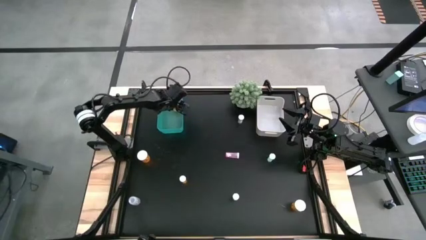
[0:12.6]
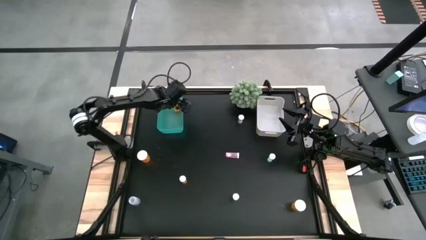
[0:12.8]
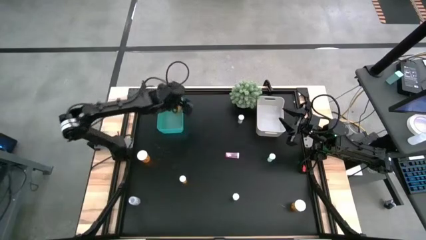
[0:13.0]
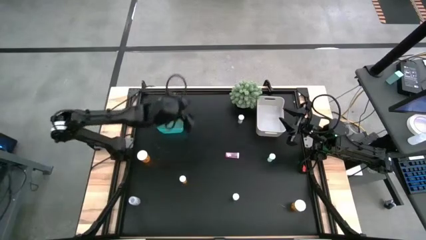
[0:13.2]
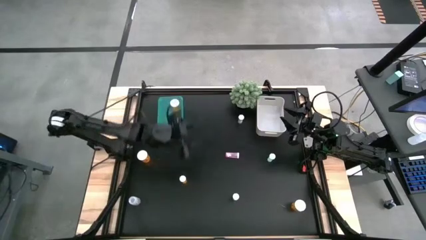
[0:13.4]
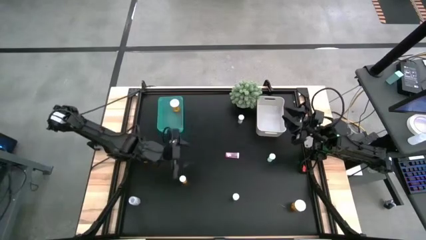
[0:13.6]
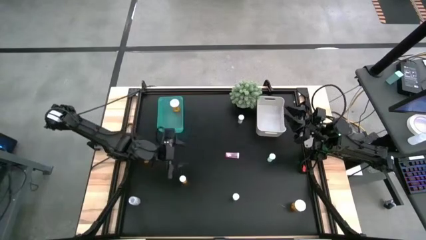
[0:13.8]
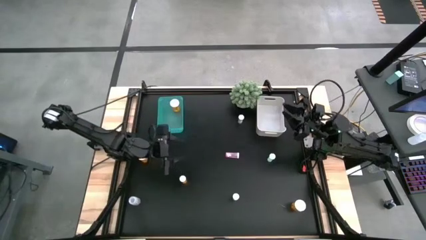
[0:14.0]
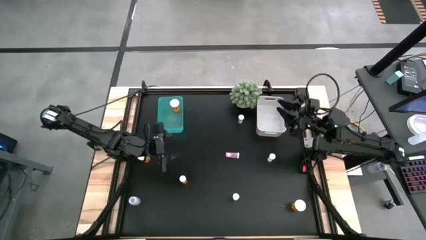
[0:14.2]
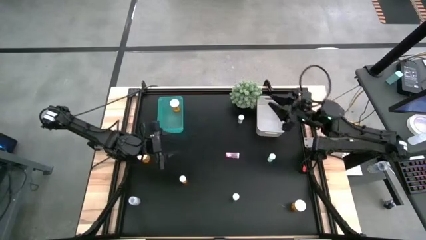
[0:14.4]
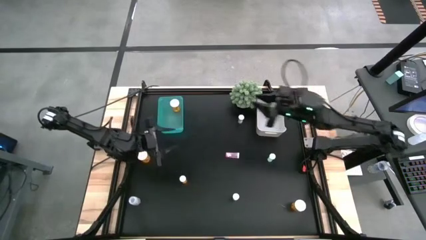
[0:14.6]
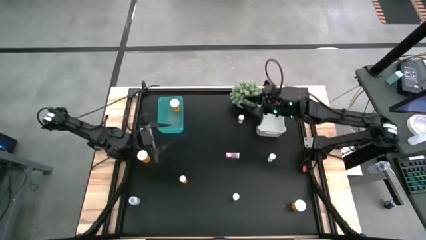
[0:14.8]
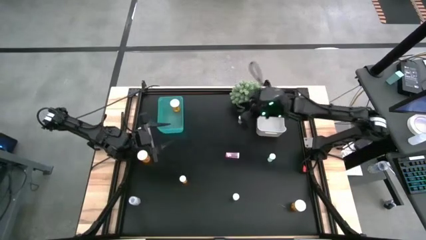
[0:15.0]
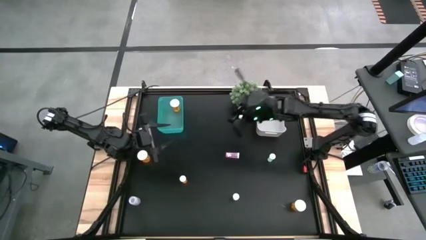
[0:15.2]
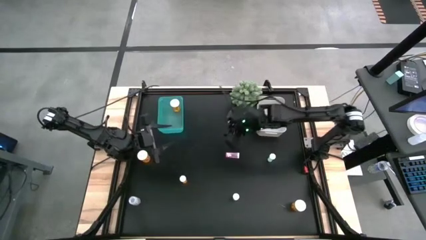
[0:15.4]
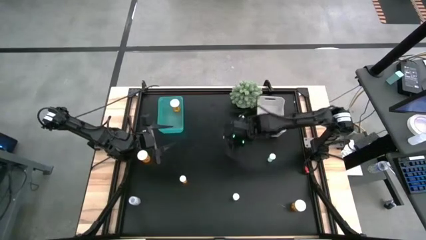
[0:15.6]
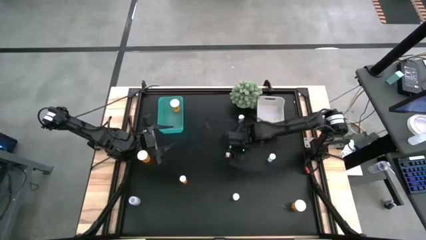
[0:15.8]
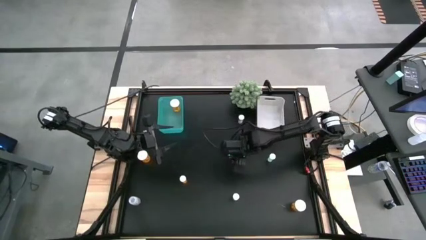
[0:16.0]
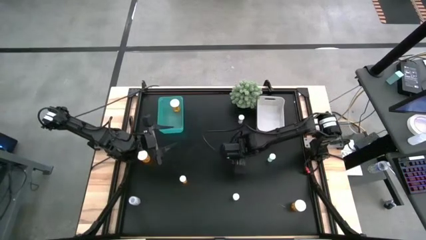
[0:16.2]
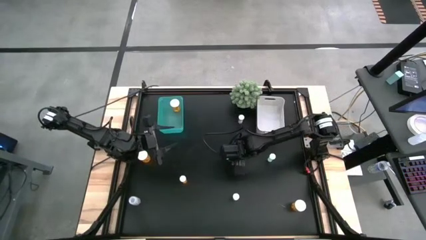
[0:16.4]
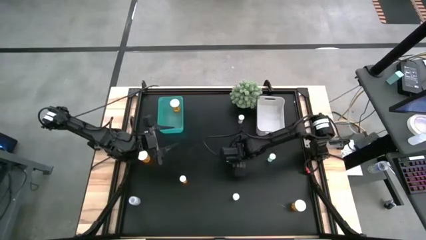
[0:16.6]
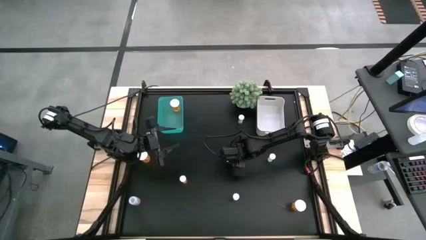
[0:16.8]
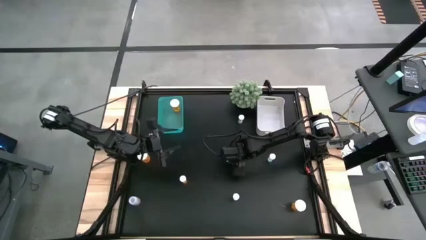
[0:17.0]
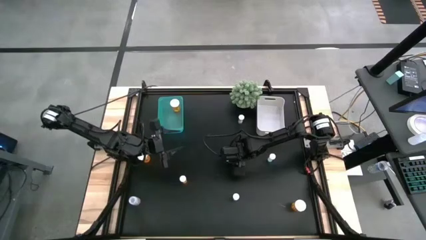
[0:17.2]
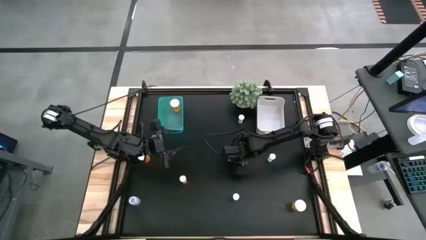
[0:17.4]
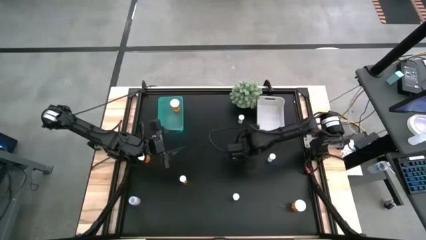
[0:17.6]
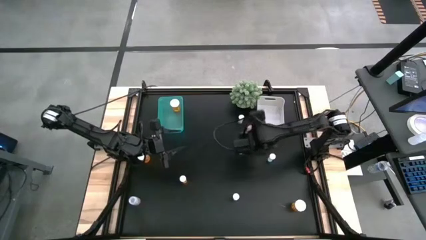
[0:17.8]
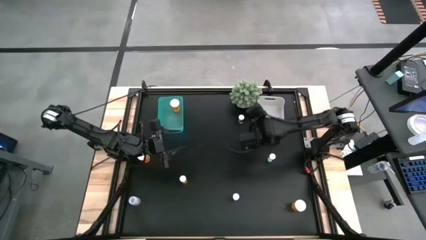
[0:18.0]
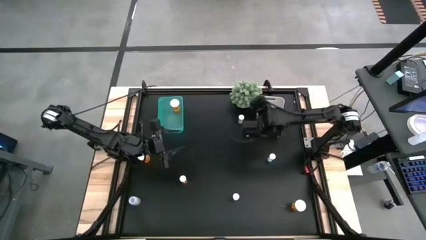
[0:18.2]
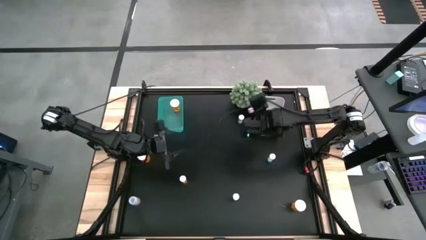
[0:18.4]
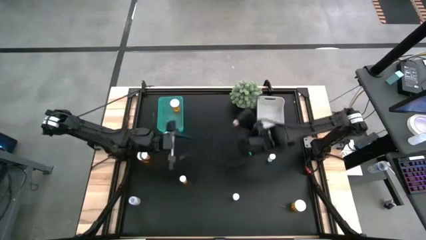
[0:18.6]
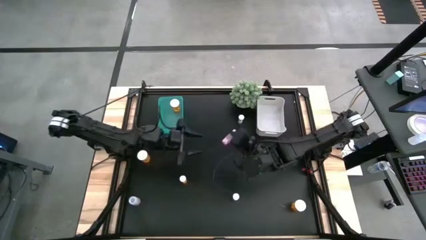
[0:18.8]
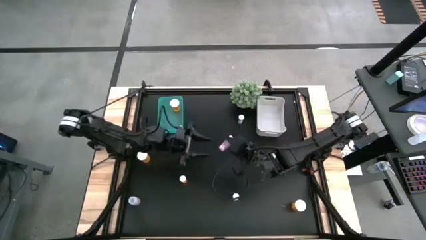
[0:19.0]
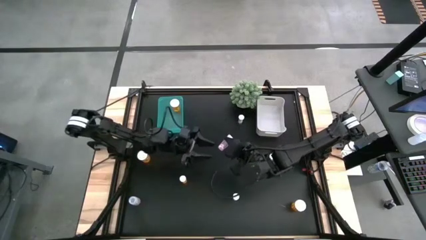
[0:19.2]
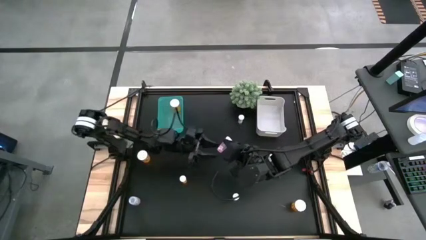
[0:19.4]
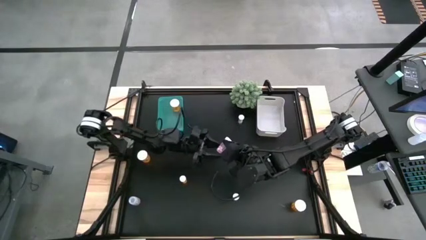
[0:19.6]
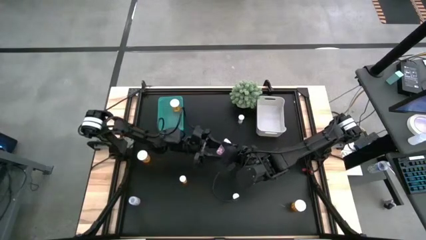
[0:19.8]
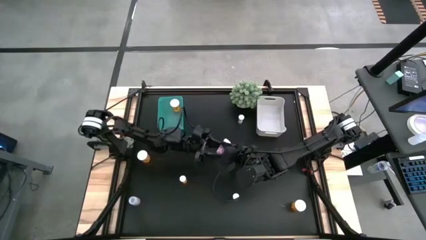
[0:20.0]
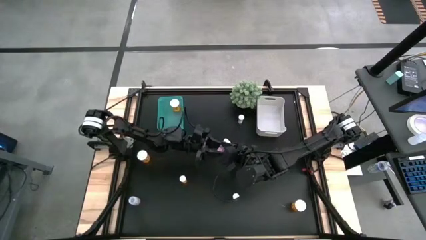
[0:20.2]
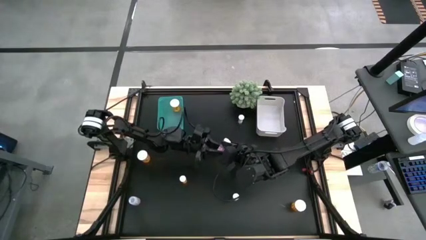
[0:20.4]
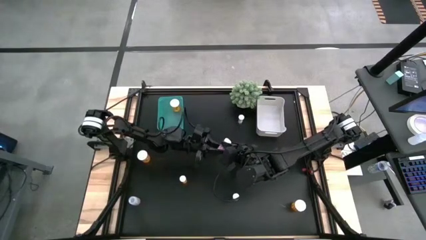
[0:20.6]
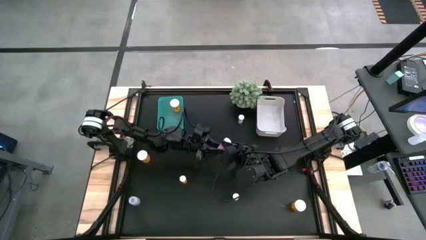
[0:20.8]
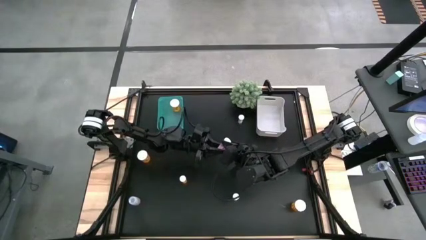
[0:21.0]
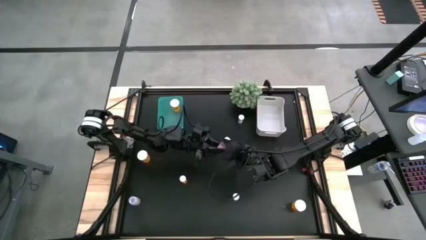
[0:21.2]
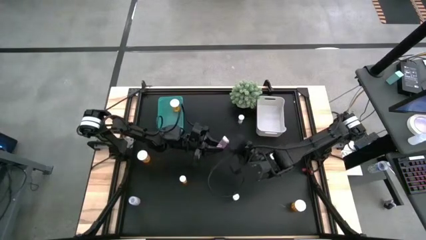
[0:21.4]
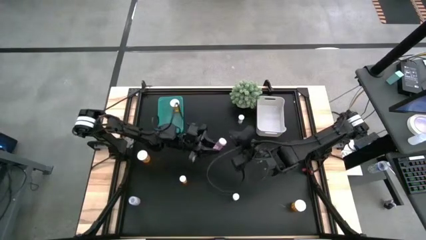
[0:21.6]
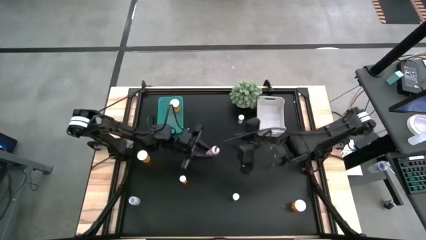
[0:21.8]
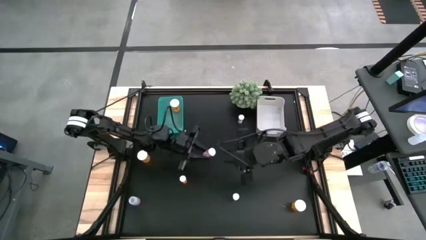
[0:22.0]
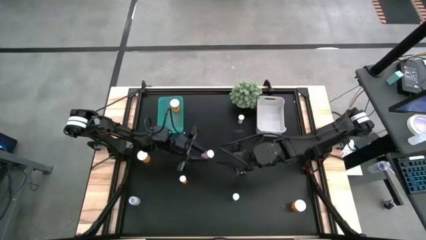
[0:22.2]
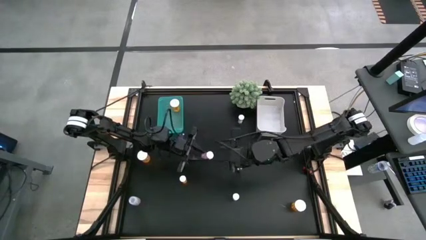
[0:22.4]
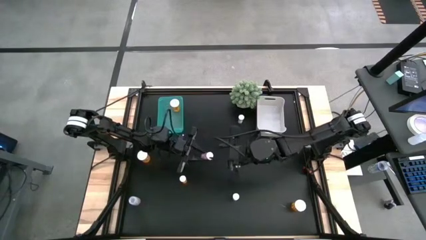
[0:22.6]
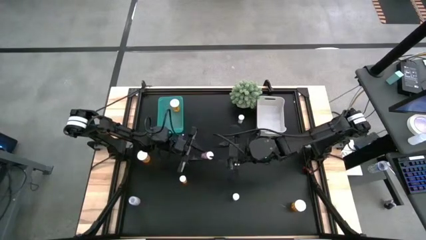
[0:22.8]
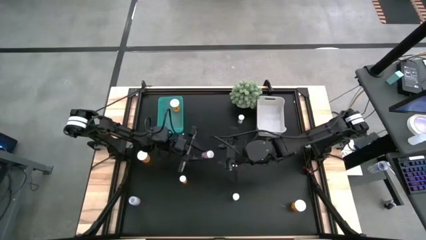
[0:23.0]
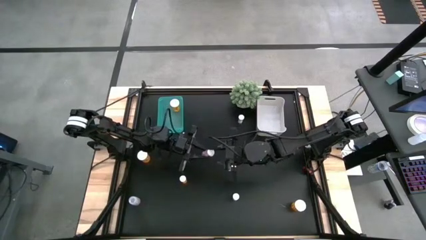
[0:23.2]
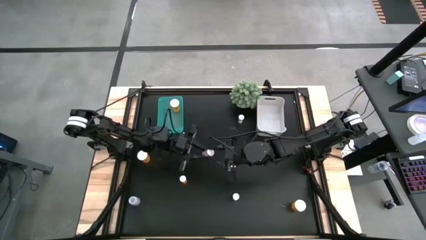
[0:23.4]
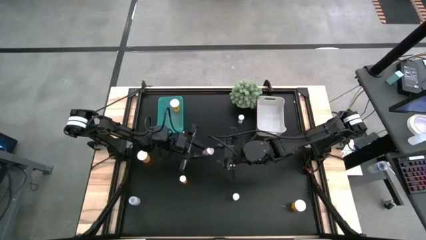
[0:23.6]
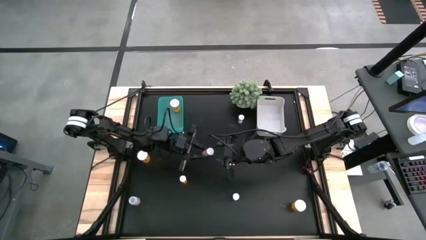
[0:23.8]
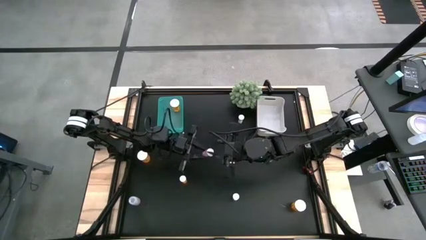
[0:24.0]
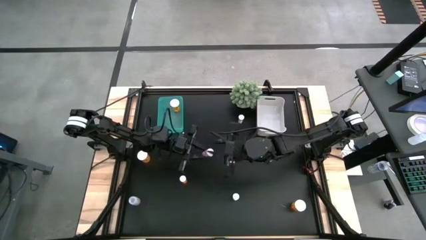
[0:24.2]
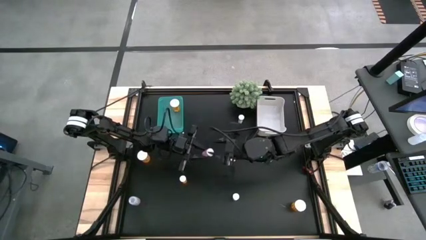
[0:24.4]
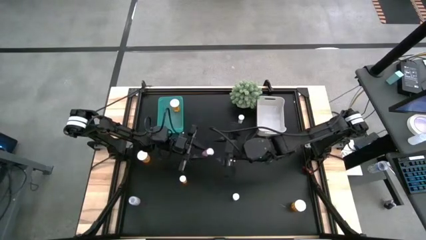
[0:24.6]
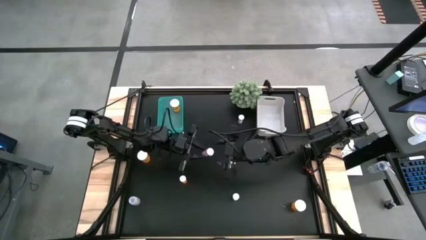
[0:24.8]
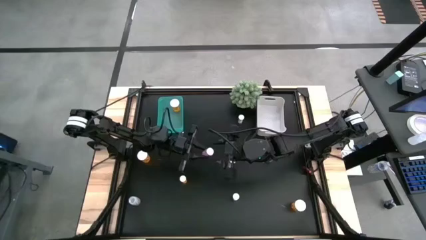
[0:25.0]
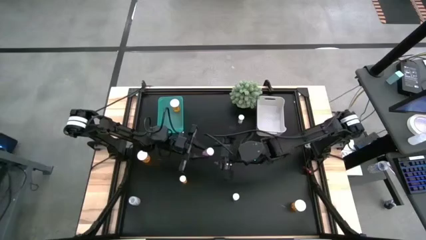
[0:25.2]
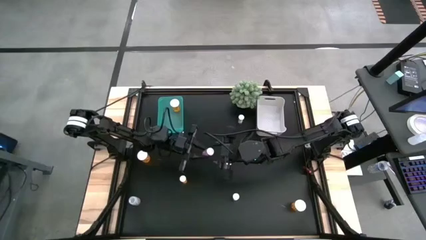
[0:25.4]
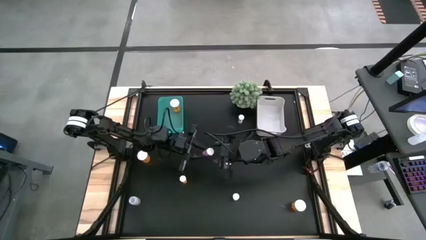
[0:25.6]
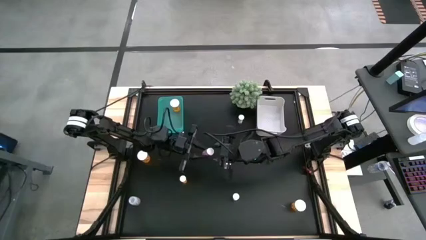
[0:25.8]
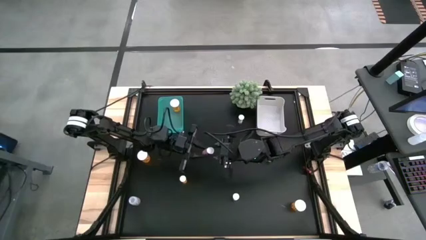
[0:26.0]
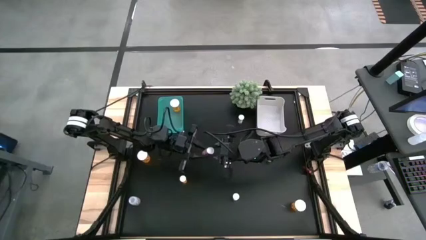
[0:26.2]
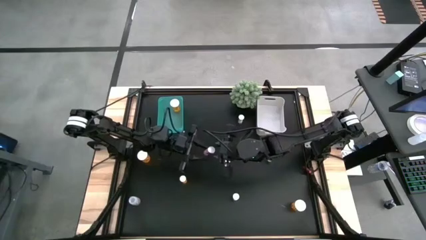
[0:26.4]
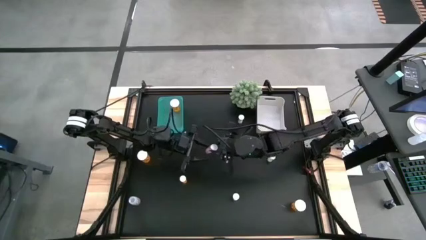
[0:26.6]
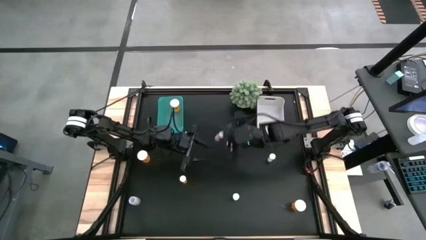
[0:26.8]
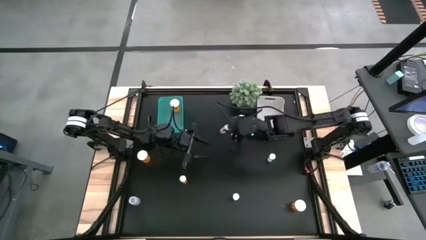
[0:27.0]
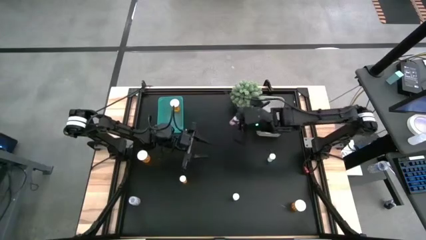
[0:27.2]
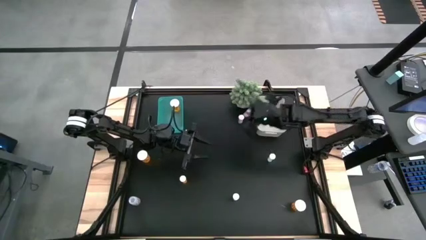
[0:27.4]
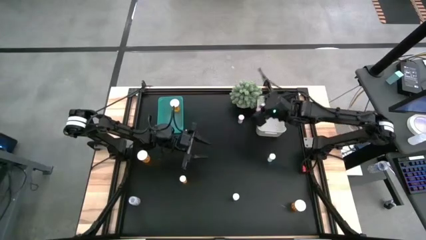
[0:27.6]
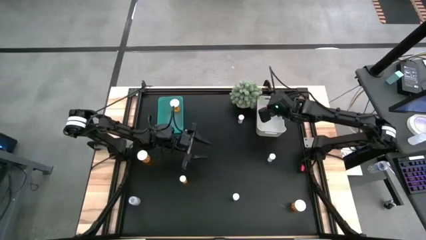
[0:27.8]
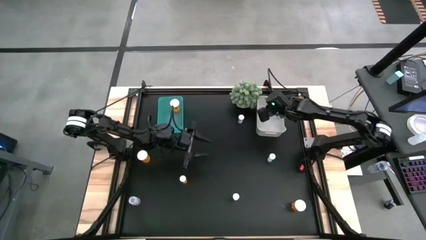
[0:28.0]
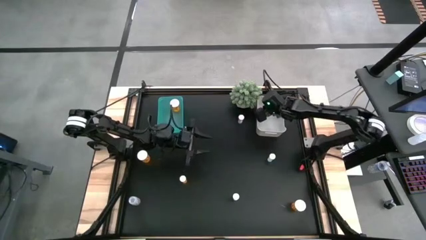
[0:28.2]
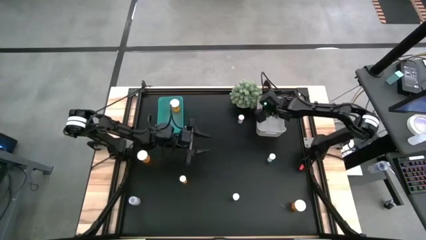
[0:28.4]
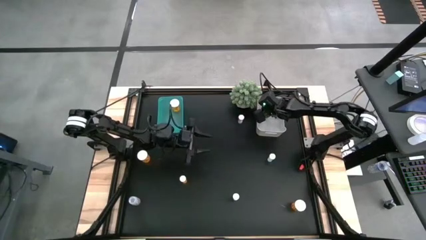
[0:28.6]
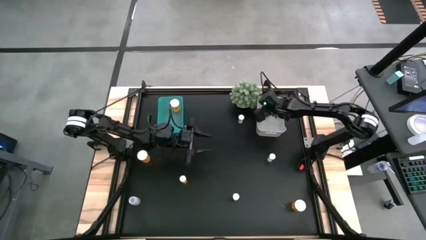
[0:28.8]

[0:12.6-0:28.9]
Task: Pick and place medicine bottles into bin by pill shape (circle, oval)
Put the pink tablet bottle into the white bin
